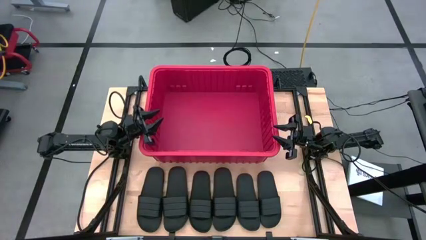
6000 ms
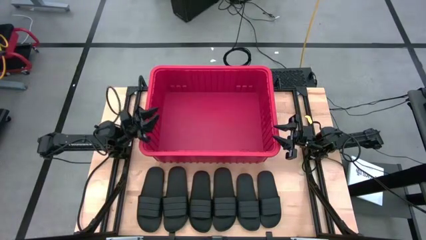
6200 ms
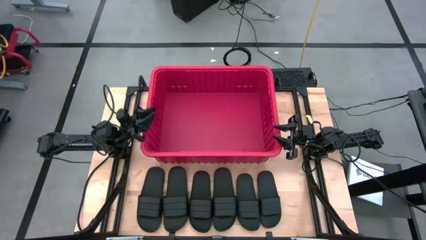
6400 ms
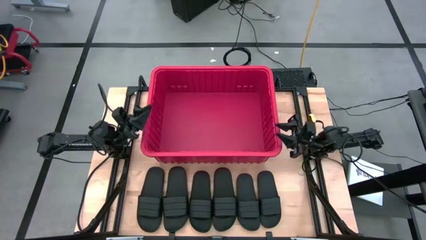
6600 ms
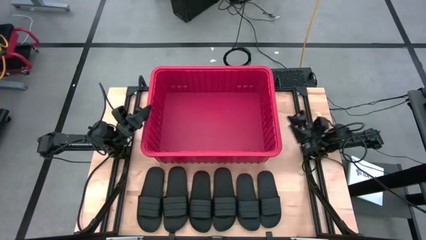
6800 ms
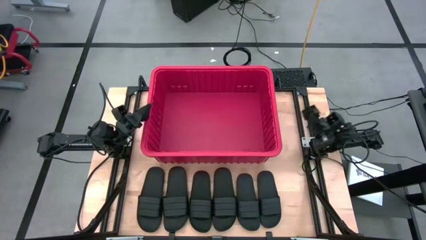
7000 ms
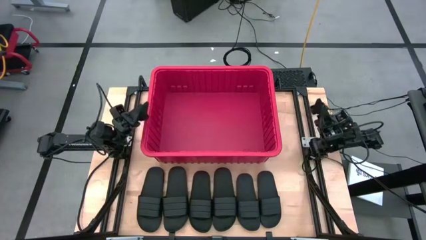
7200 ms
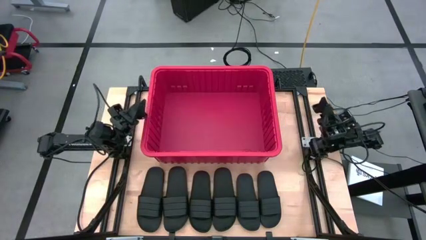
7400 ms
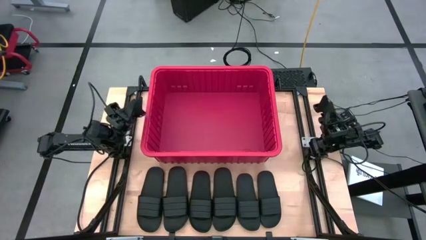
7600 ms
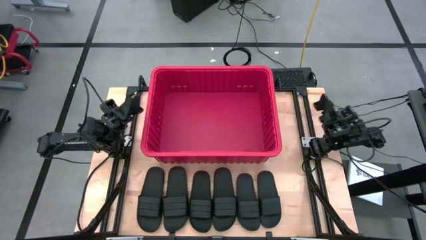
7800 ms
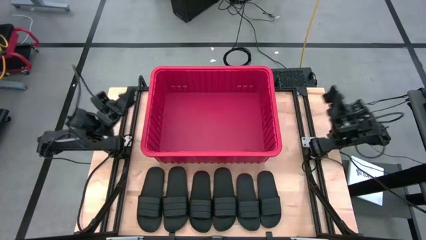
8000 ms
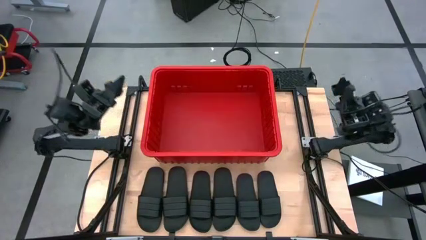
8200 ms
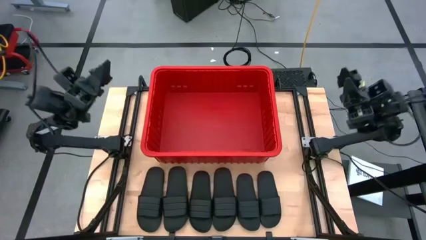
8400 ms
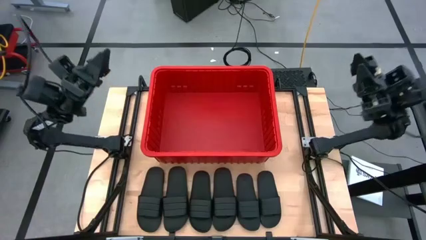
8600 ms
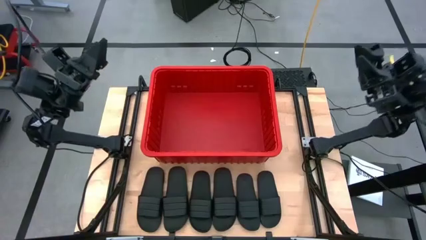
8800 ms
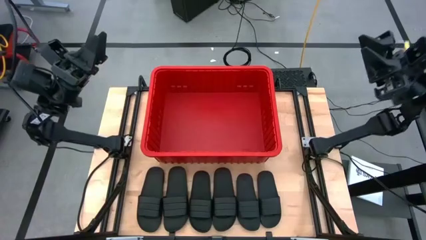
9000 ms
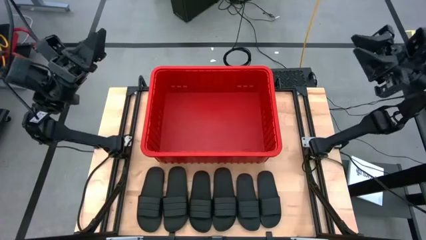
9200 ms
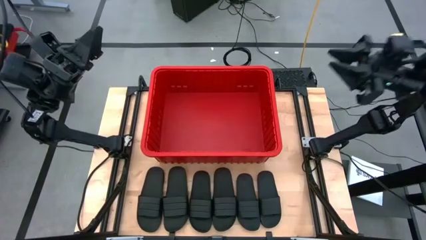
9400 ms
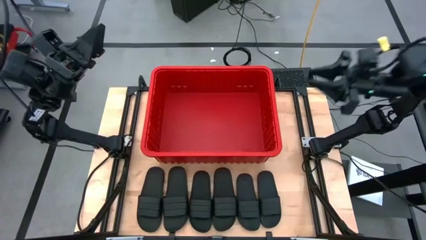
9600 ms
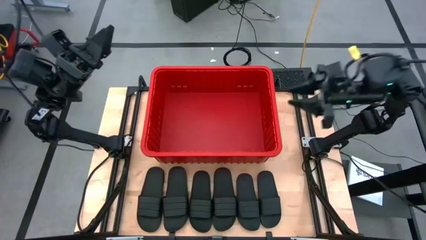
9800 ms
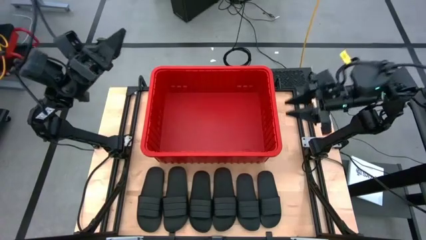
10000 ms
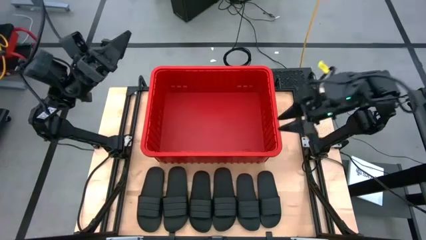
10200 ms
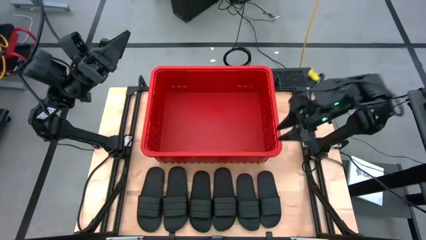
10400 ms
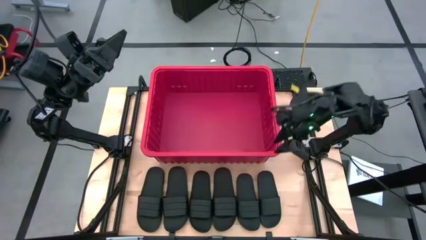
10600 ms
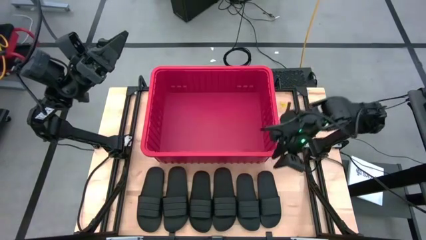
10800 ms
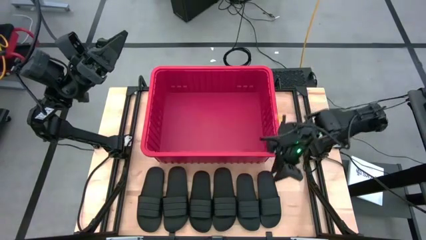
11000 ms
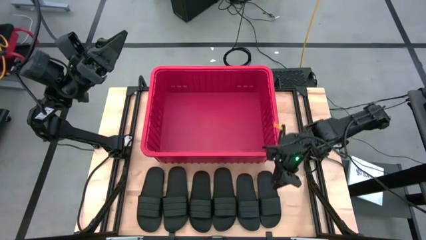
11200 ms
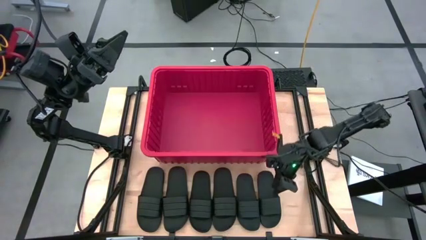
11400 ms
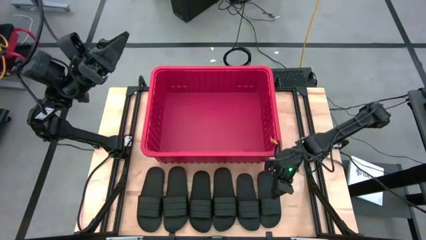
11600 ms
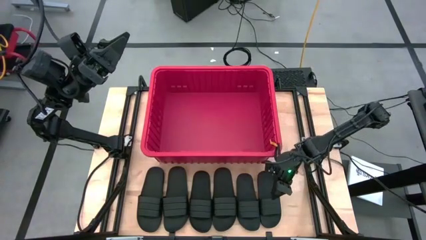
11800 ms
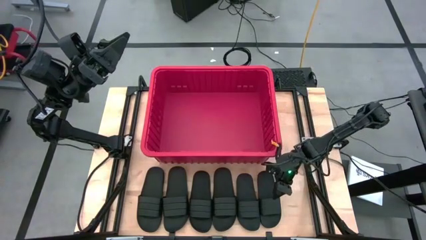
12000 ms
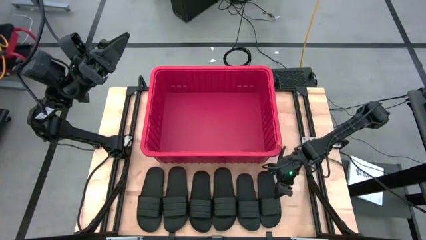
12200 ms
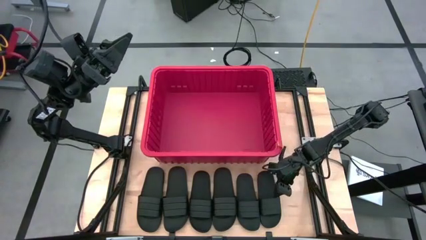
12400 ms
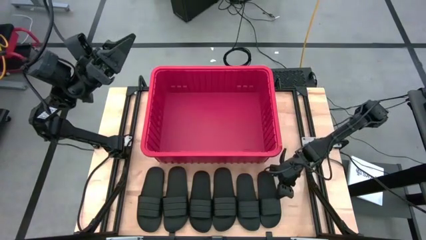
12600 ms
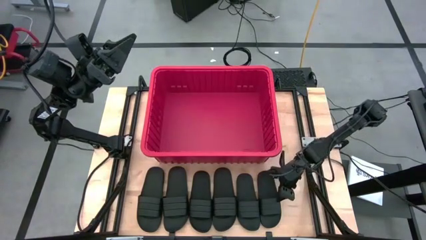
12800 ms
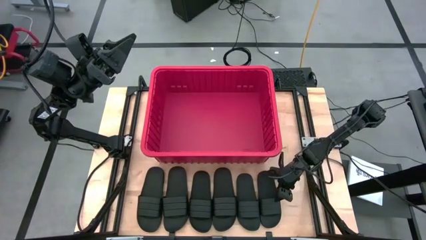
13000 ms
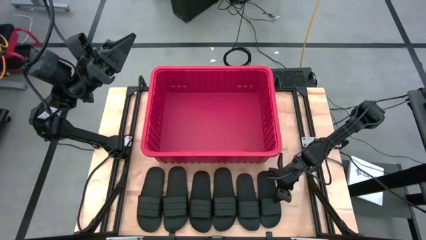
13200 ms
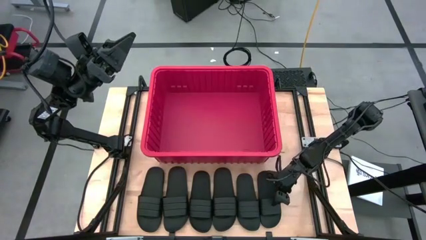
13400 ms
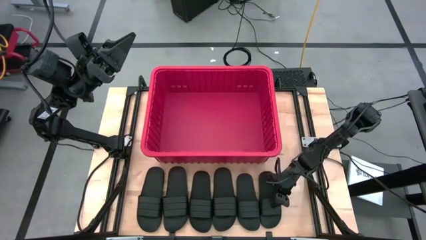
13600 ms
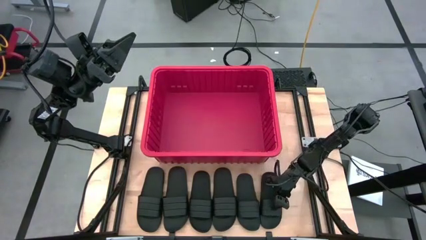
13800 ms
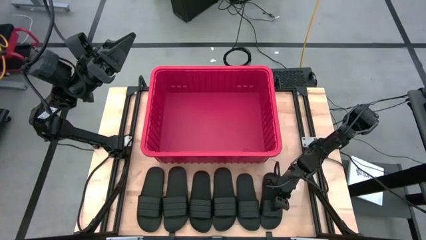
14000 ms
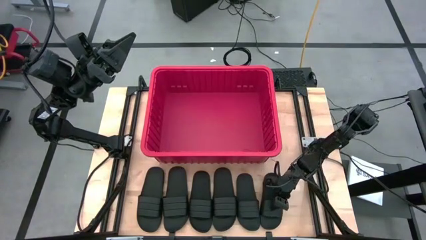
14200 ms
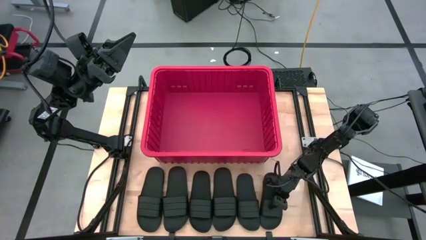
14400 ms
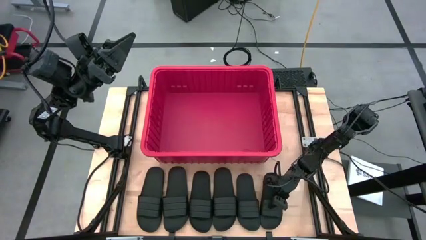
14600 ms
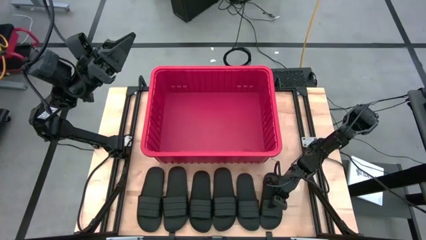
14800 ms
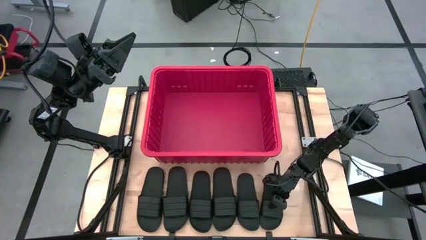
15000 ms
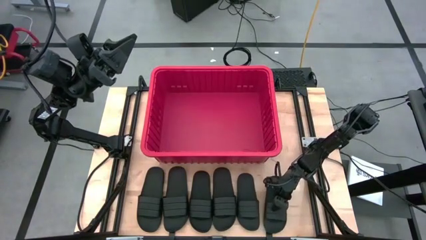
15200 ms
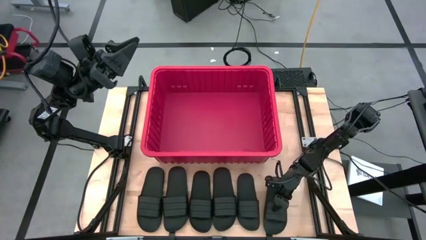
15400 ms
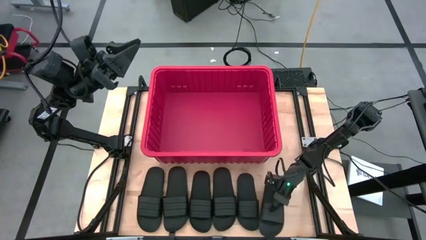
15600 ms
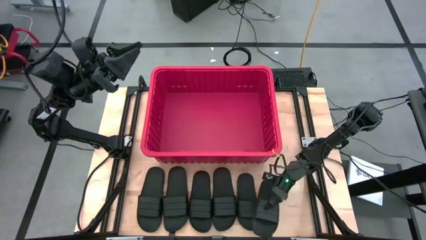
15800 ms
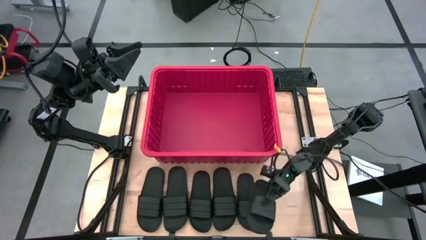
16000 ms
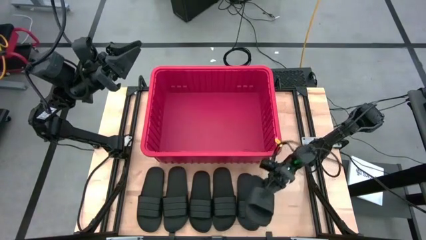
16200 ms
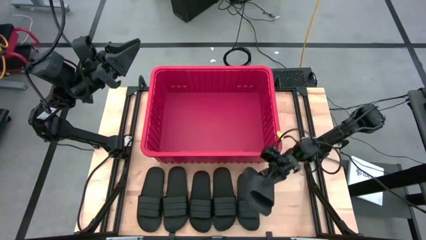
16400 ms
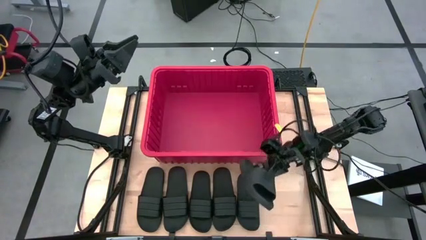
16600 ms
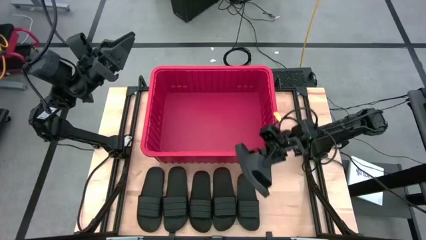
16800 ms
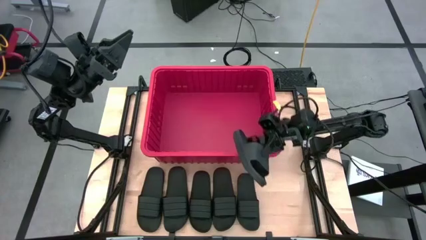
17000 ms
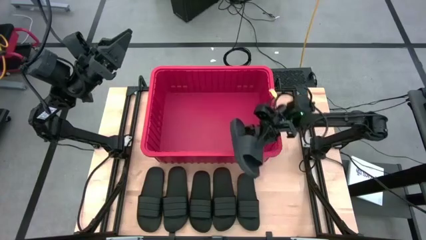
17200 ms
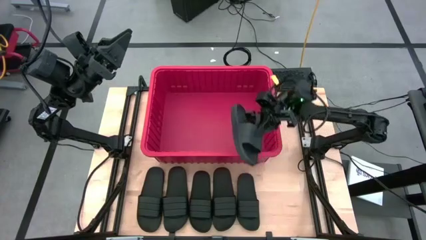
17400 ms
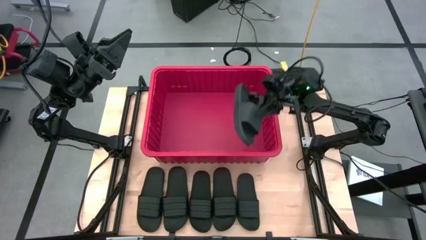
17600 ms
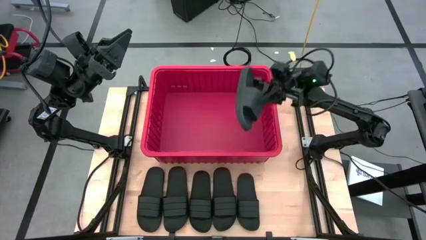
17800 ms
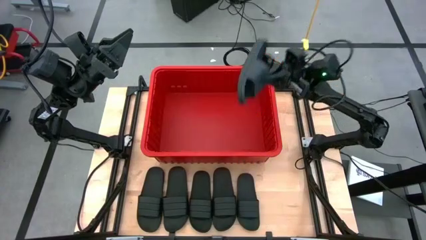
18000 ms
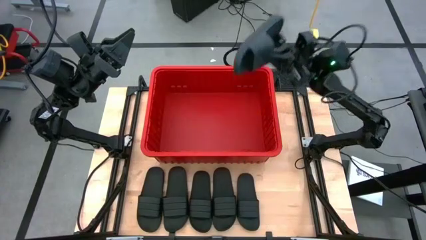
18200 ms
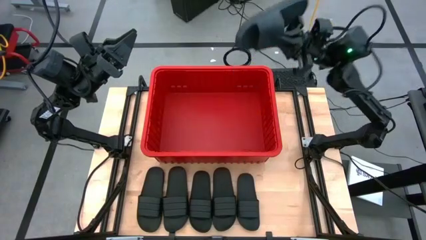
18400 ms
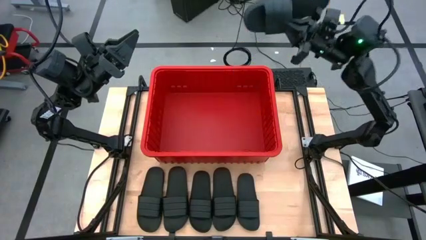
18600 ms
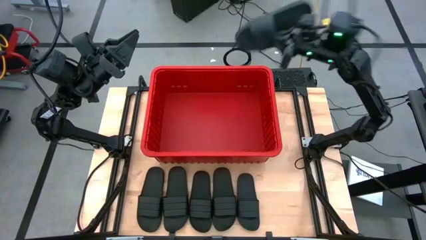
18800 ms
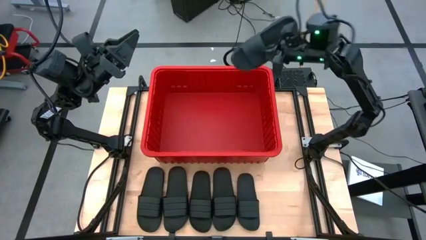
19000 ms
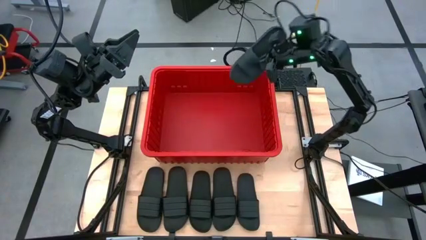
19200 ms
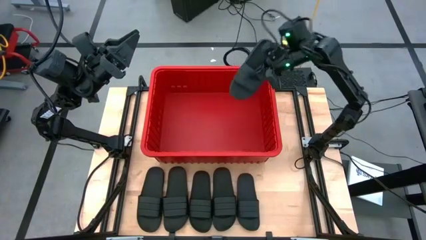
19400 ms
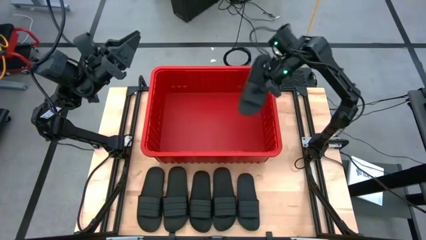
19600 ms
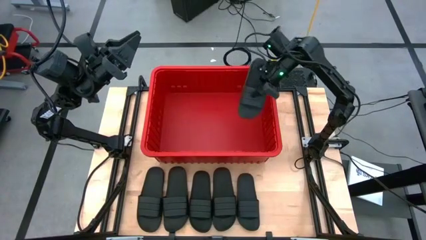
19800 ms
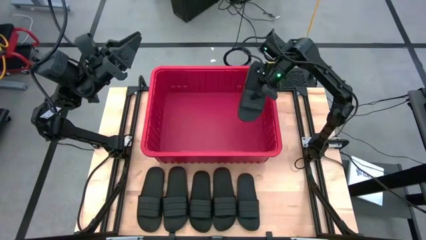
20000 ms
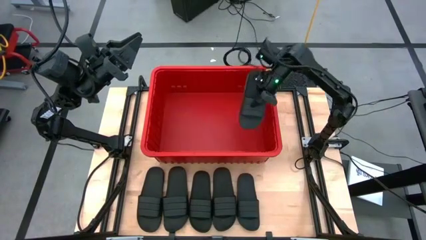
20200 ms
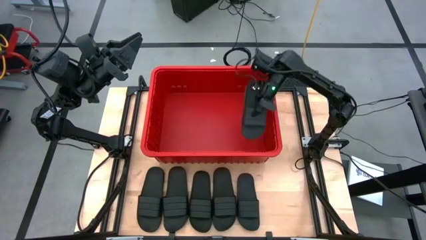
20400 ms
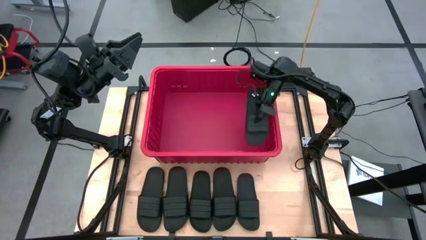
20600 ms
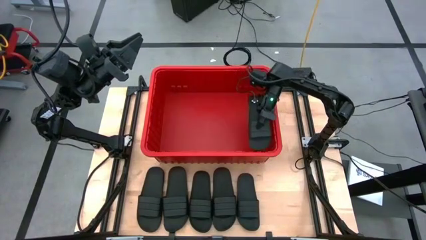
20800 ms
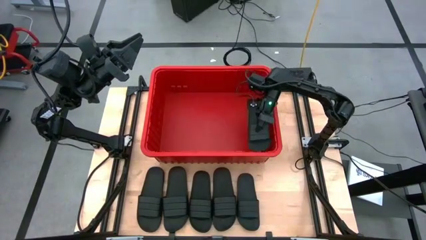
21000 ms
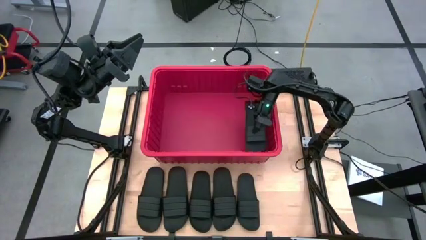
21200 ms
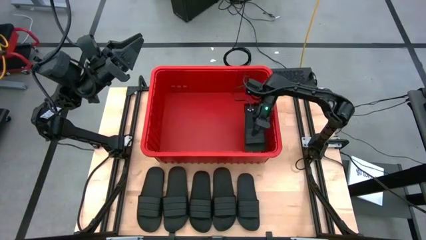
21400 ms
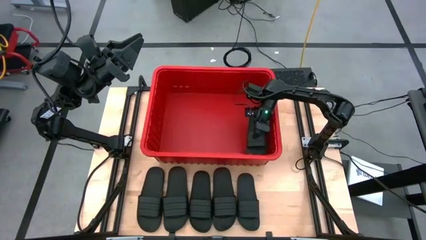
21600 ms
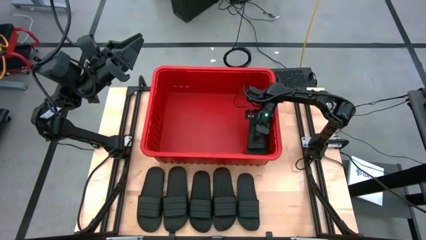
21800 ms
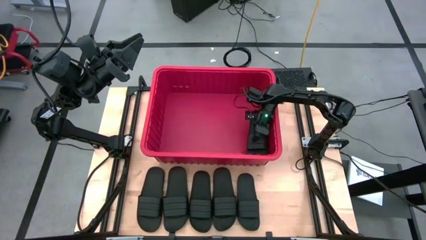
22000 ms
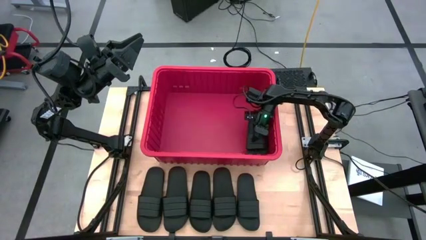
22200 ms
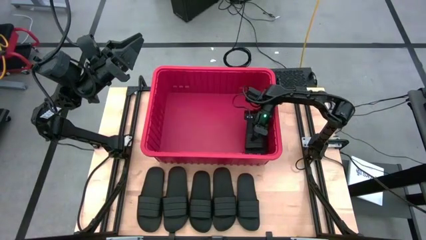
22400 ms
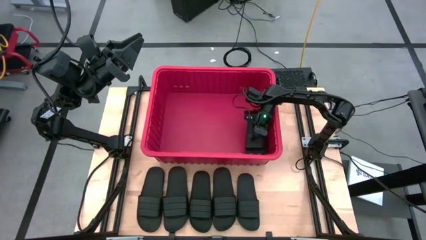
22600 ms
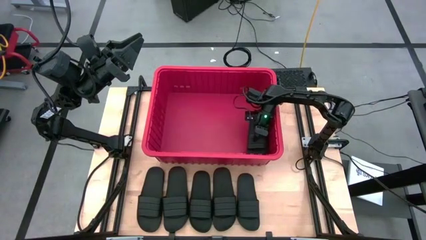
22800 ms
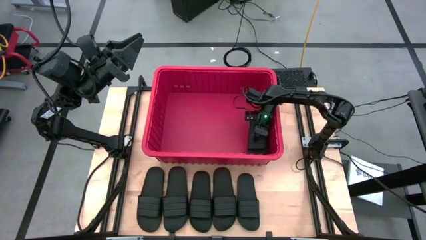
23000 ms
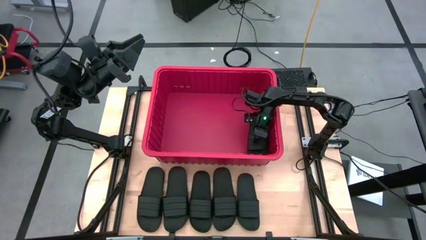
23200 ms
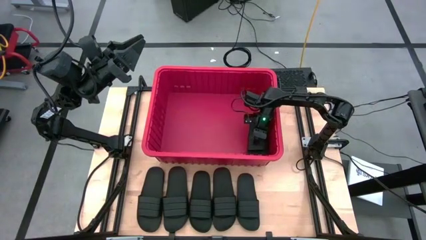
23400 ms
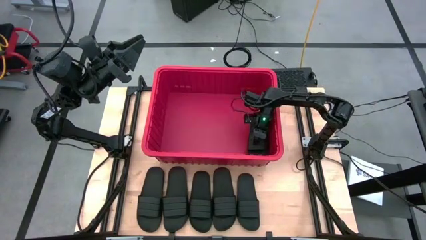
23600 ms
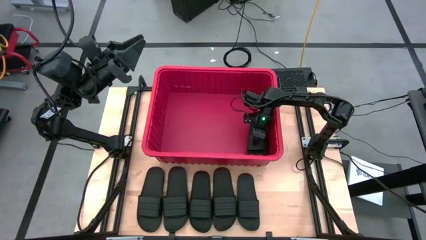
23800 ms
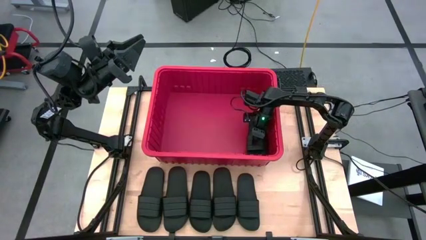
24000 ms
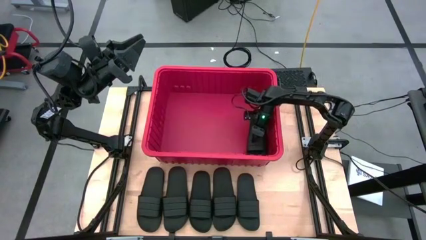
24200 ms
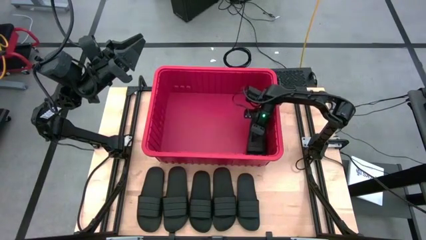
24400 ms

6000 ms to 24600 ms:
Task: Pick and place slides into bin
Put the black slide into the red bin
